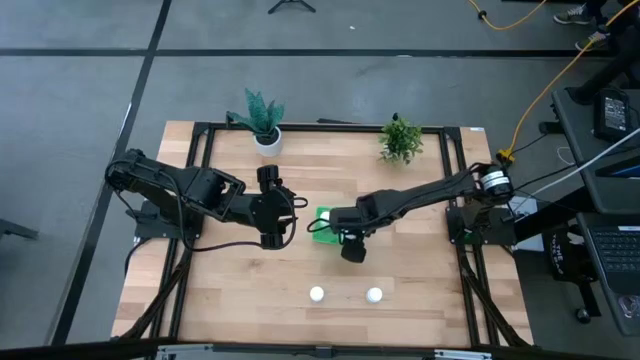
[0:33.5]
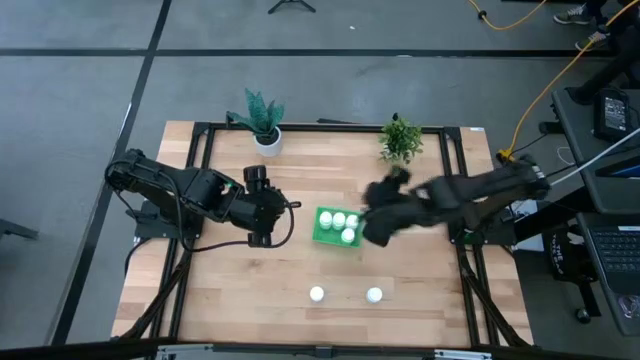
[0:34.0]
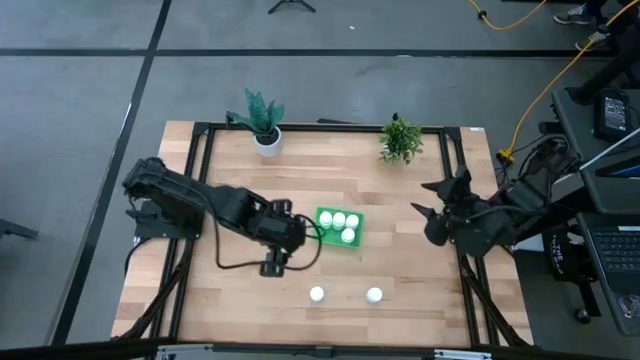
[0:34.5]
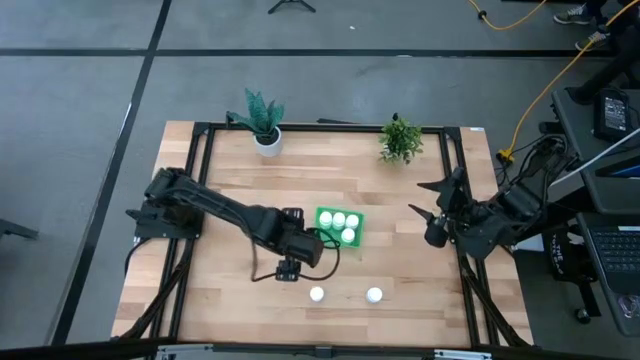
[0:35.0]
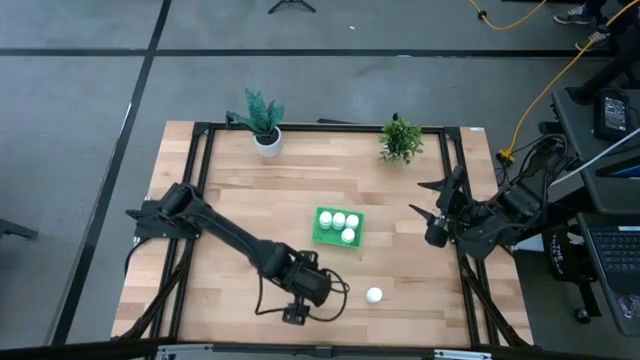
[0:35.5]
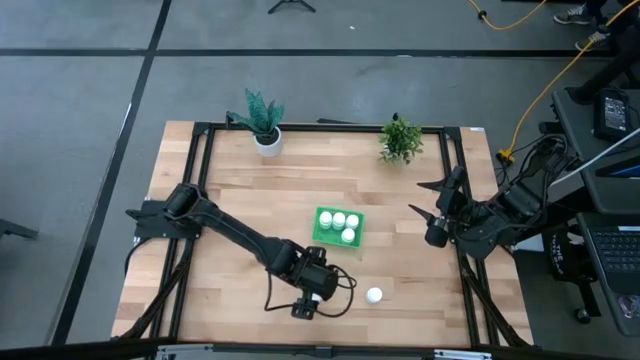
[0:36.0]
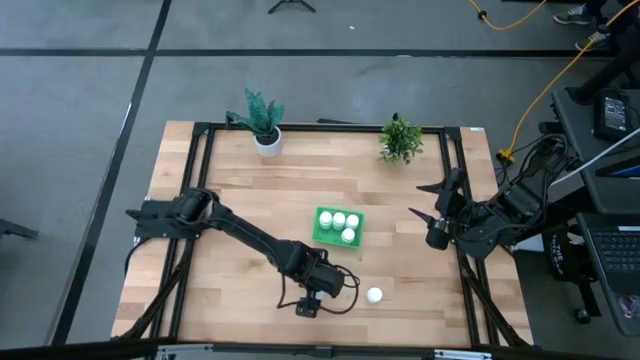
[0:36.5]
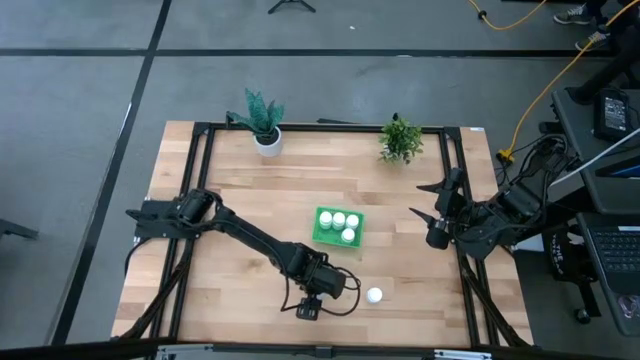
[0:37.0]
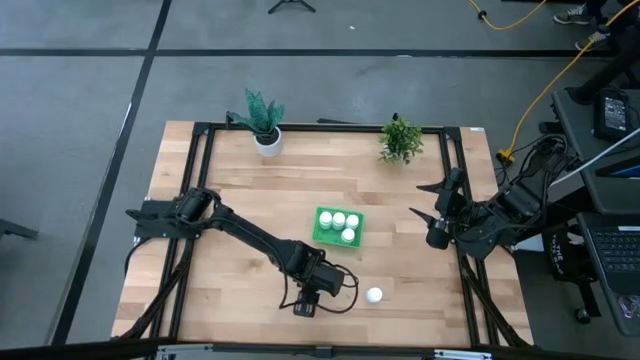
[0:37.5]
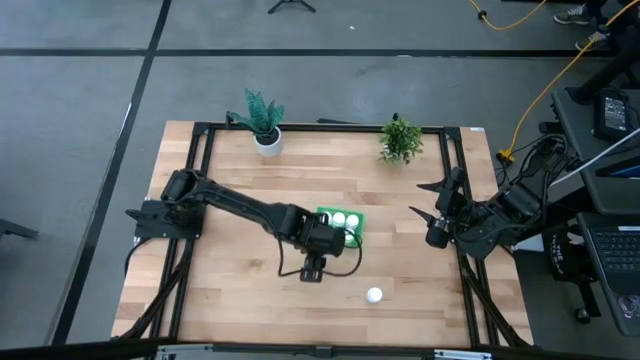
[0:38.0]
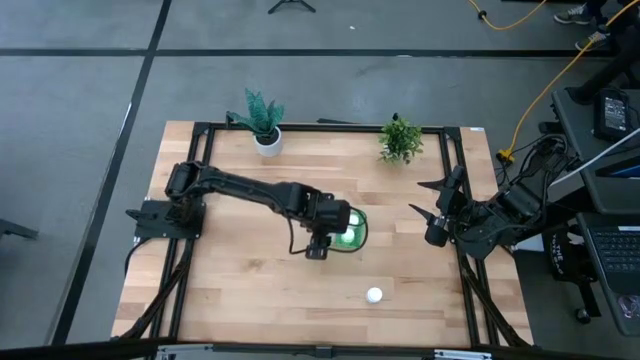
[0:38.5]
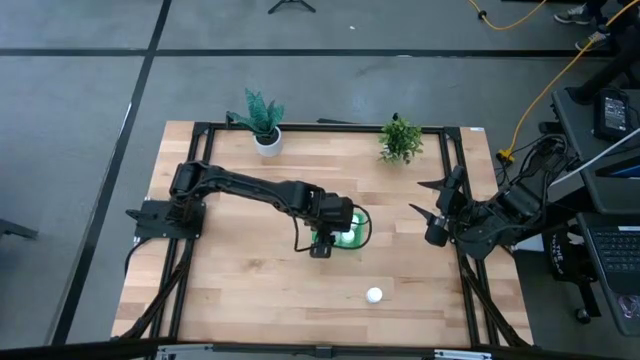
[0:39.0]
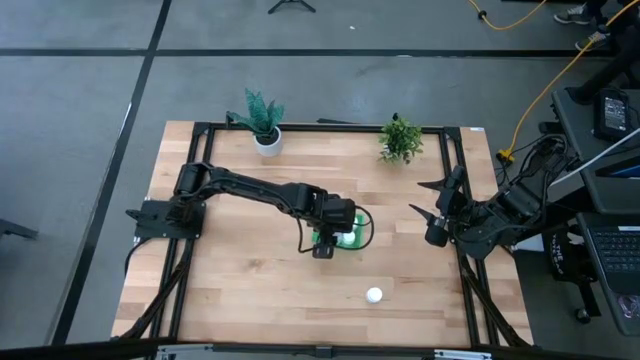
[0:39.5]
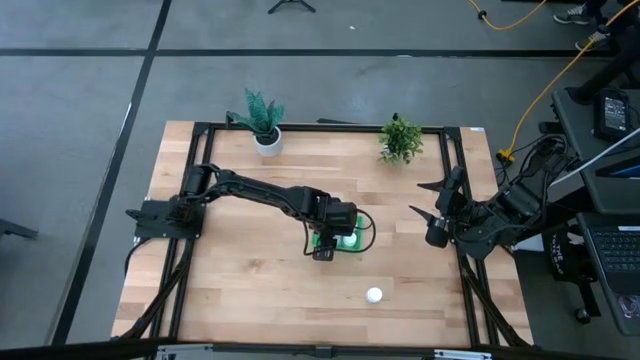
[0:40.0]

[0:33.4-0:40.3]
Task: Pick and place pill bottles into a basket
Put the white pill bottle into the green bin

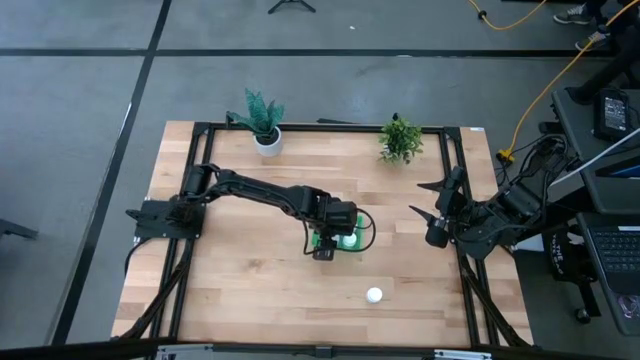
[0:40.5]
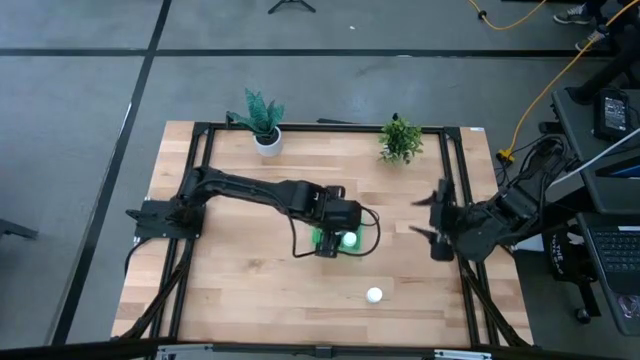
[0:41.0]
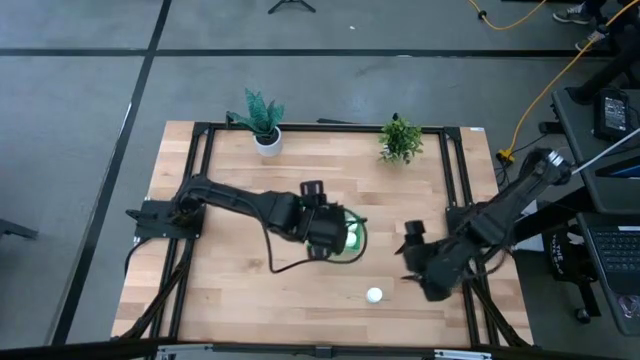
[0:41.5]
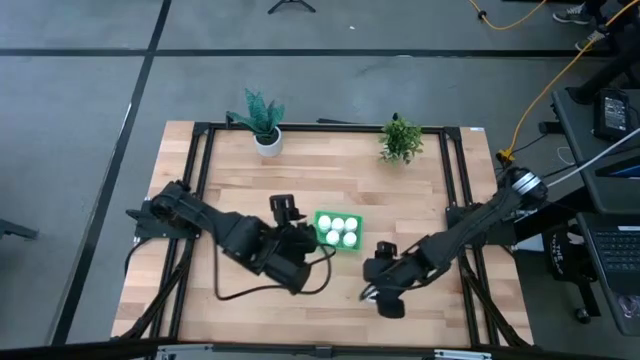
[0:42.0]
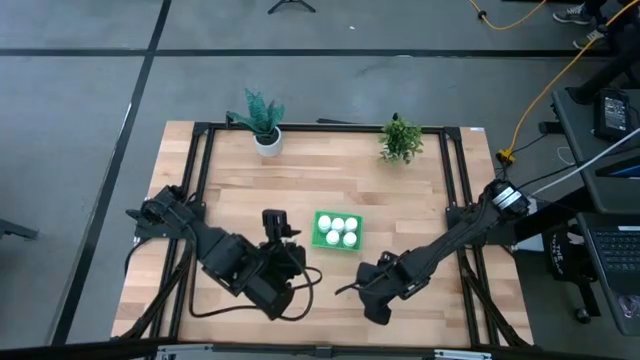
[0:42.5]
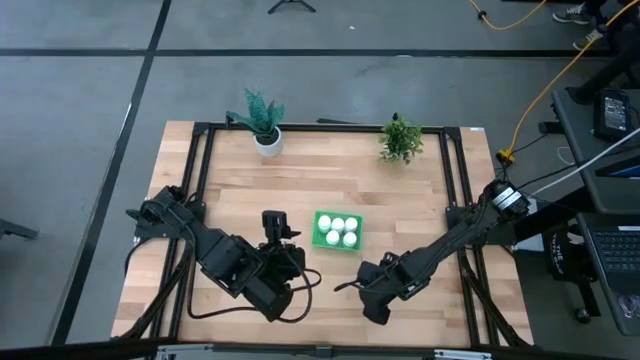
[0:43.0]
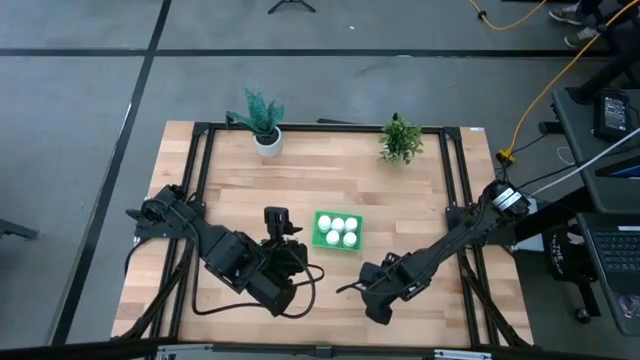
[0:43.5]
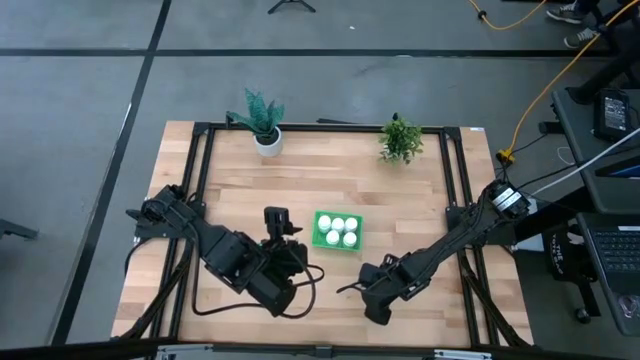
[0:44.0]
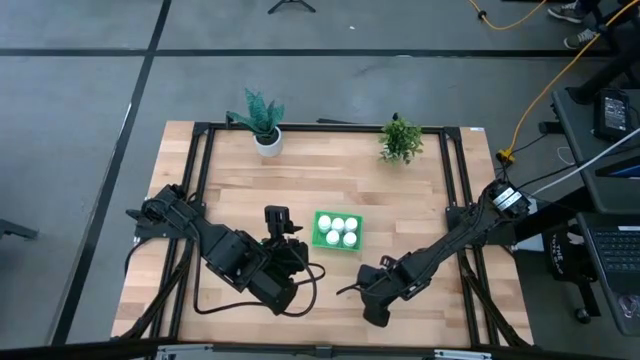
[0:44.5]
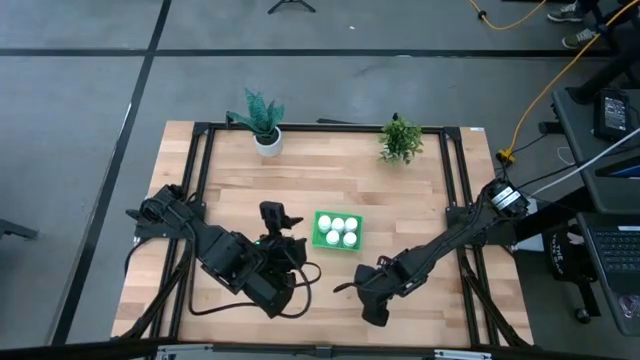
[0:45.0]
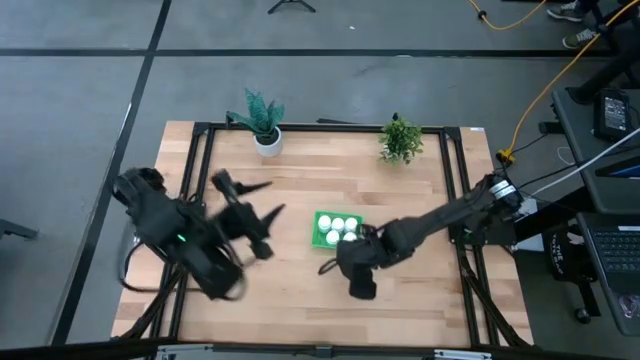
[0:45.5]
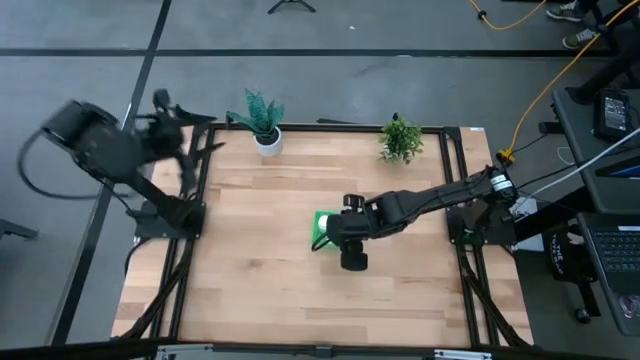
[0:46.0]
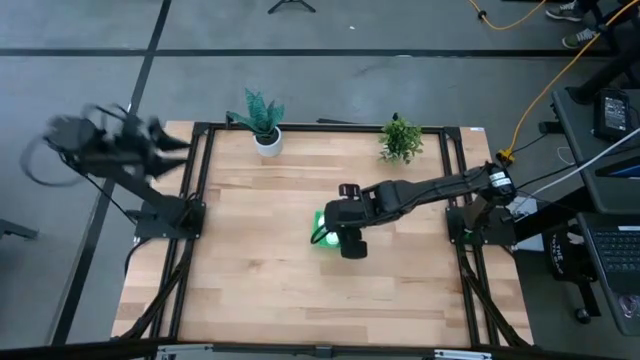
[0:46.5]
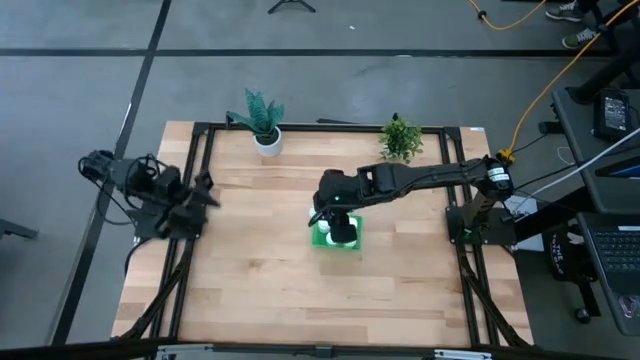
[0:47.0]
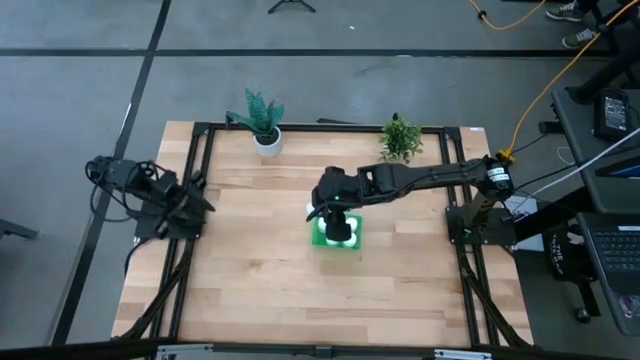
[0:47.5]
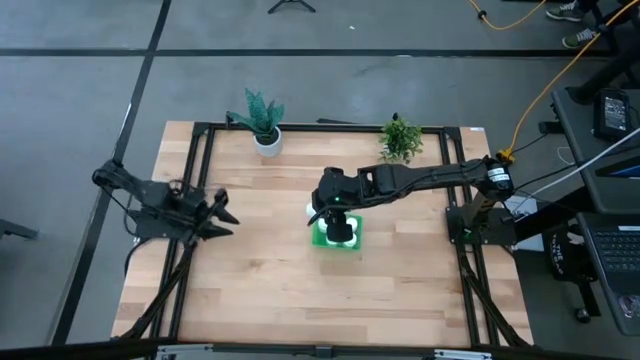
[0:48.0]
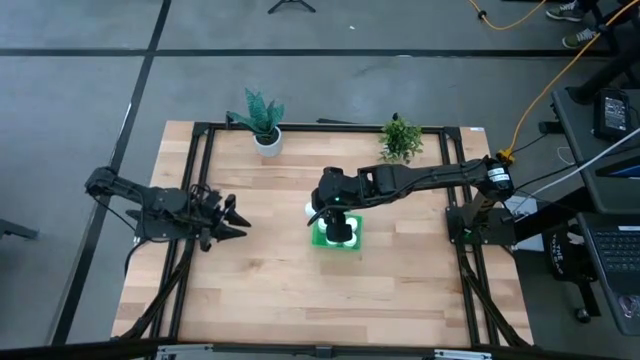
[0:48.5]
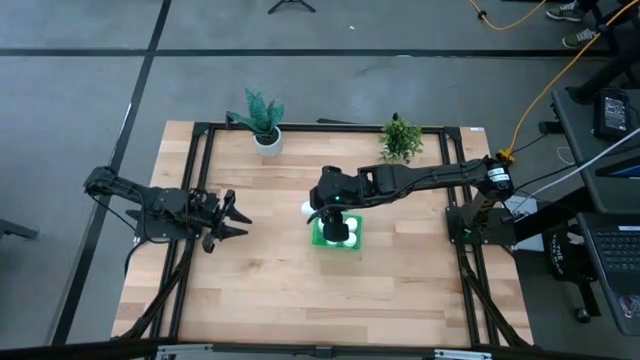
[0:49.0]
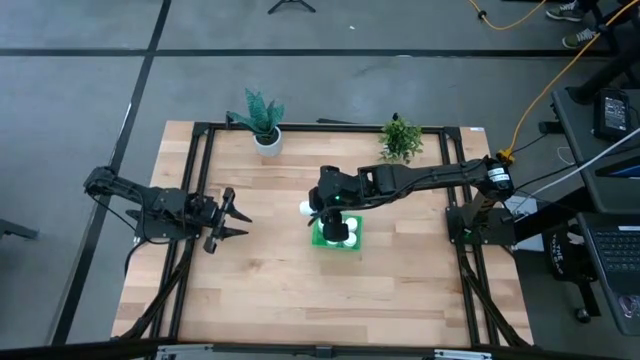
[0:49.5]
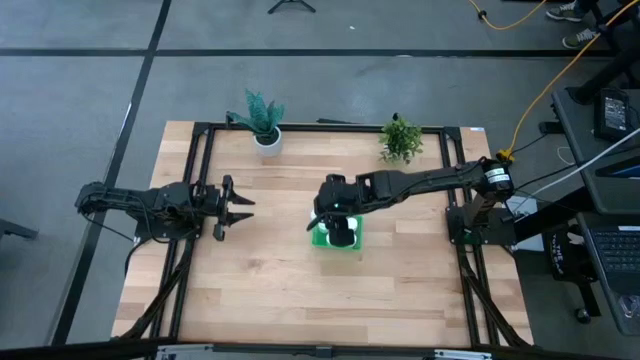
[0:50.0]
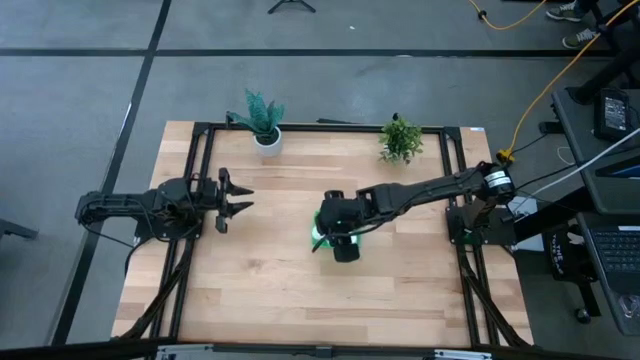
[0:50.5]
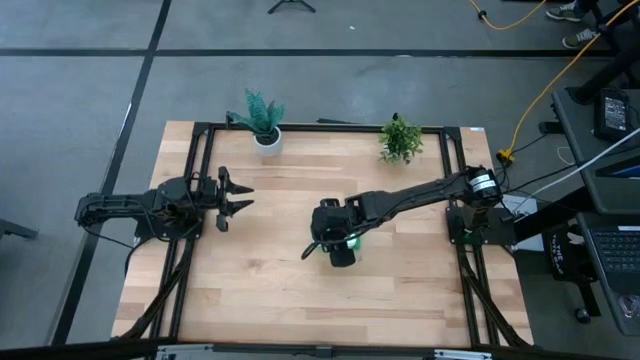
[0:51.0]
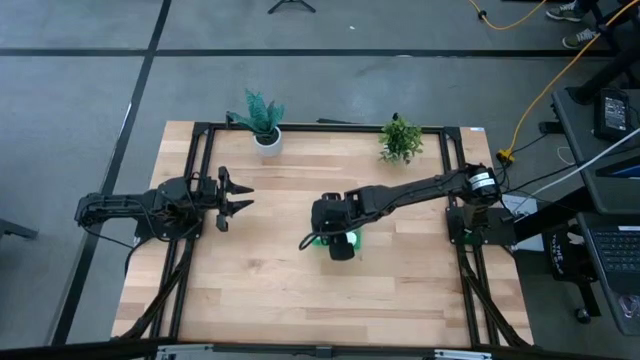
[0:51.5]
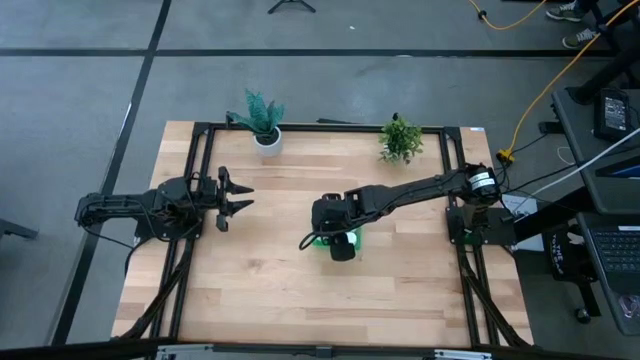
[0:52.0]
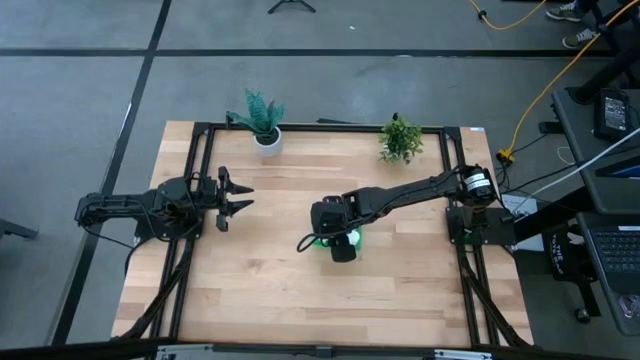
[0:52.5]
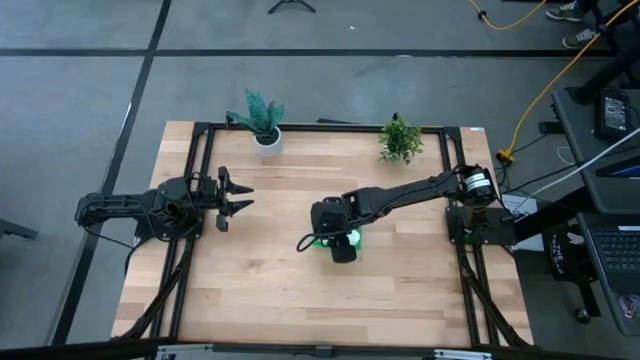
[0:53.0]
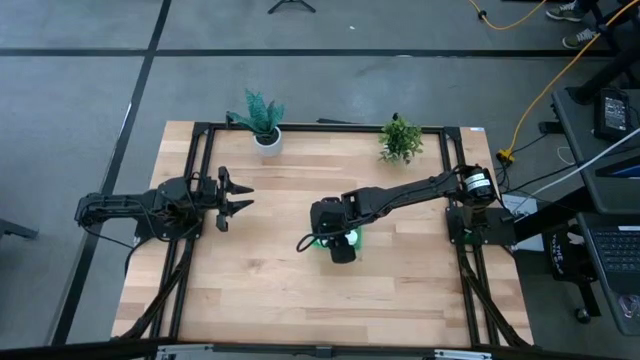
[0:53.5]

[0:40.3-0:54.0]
Put the white pill bottle into the green bin

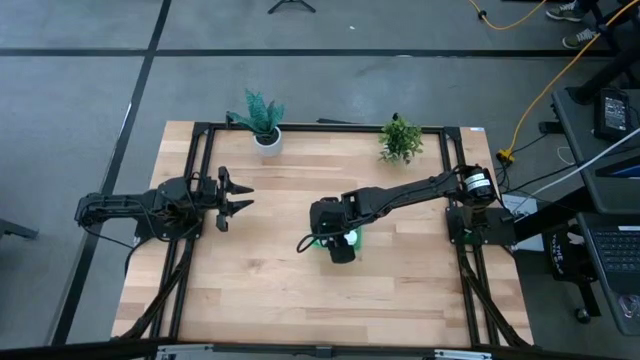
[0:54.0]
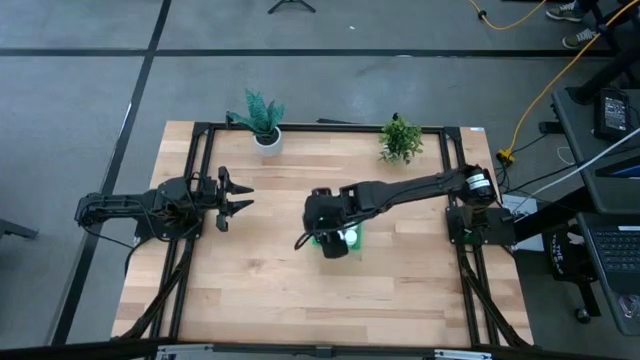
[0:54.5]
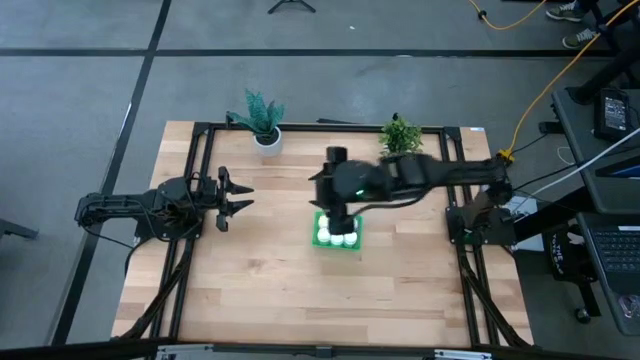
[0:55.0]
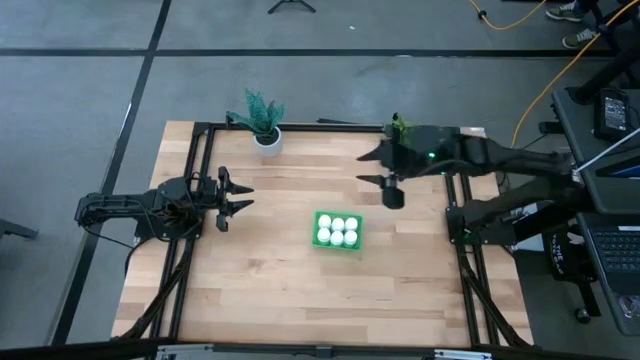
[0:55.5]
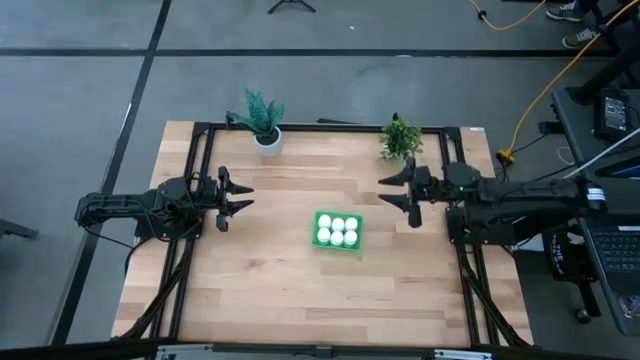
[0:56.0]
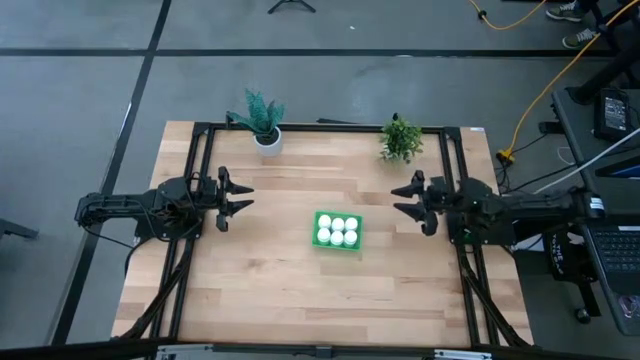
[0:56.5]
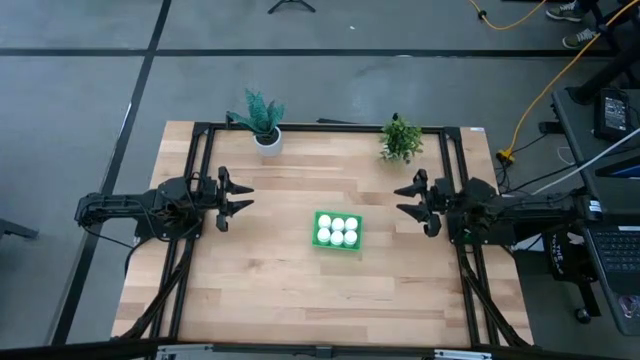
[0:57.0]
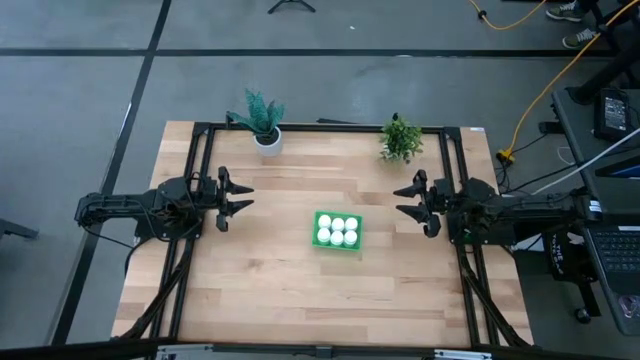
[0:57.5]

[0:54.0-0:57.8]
Return to Home Position
